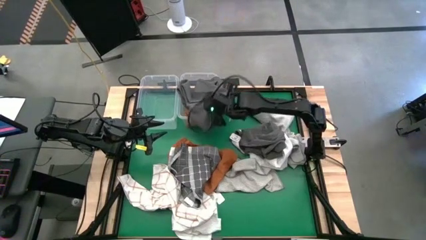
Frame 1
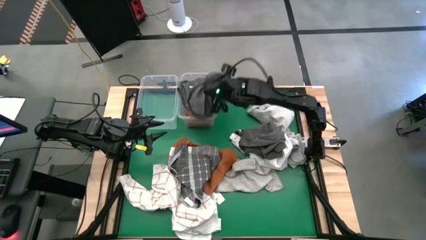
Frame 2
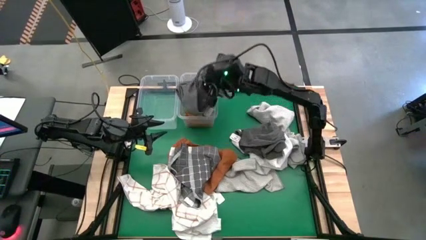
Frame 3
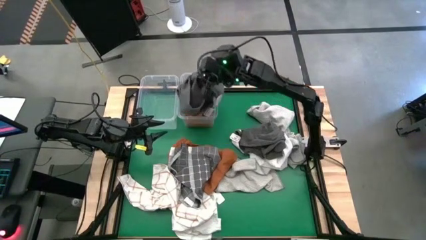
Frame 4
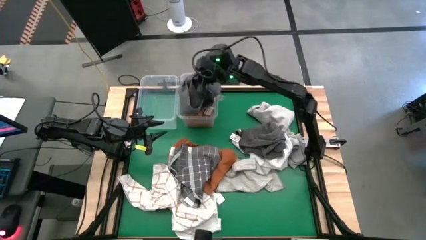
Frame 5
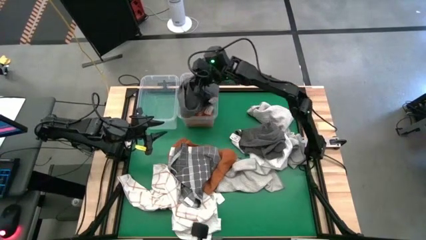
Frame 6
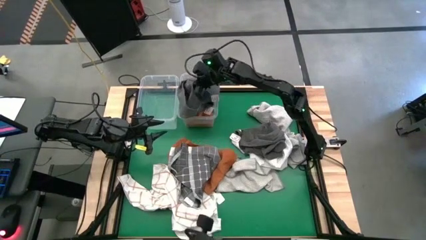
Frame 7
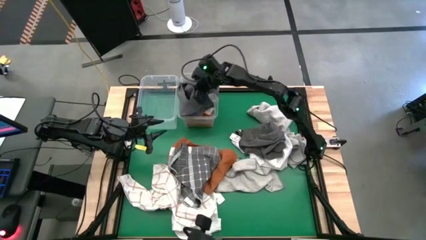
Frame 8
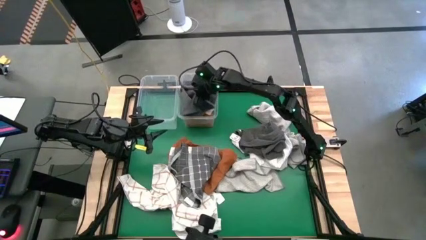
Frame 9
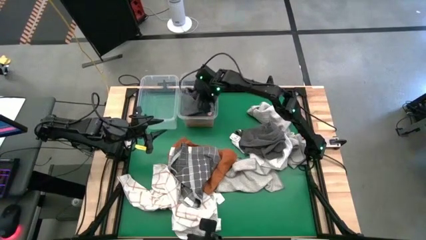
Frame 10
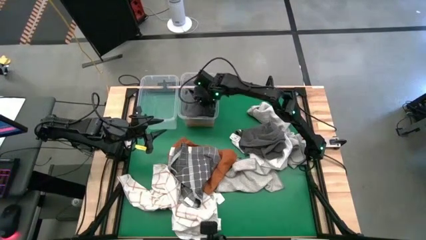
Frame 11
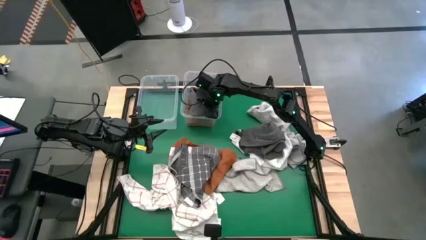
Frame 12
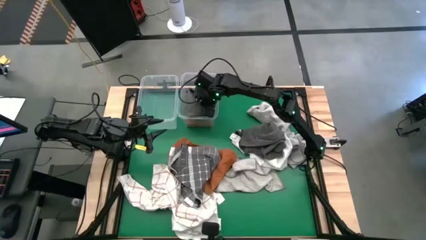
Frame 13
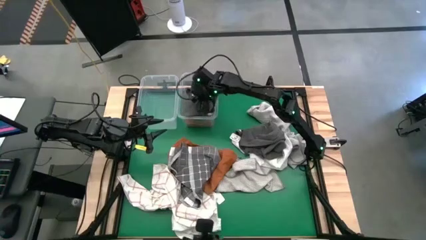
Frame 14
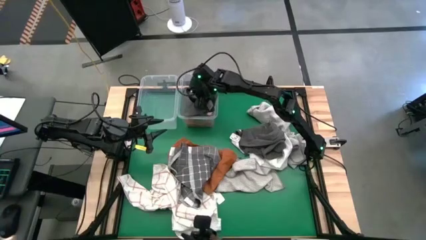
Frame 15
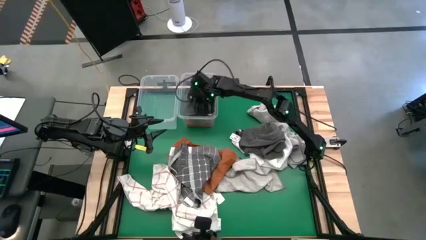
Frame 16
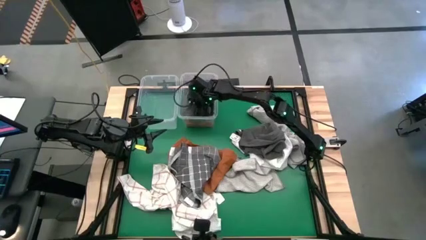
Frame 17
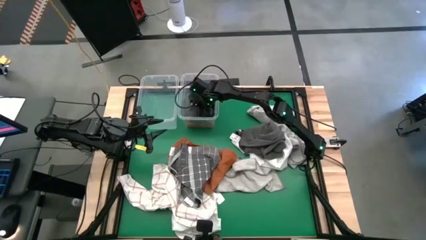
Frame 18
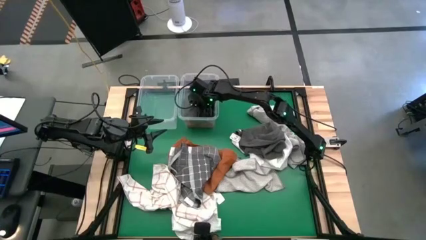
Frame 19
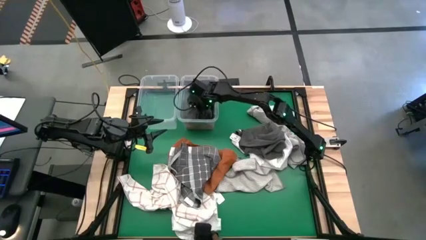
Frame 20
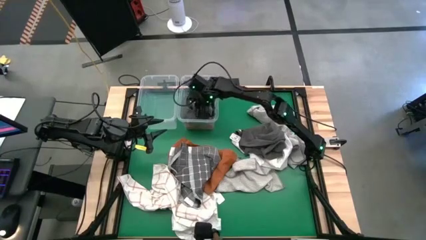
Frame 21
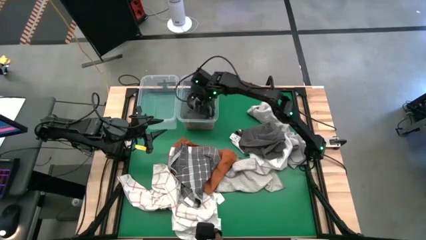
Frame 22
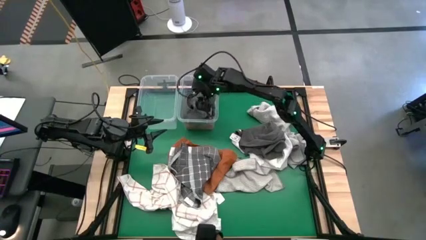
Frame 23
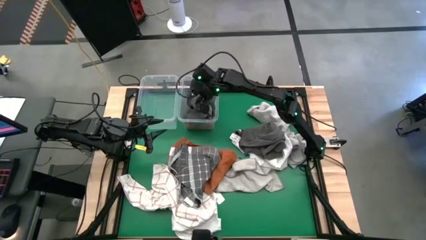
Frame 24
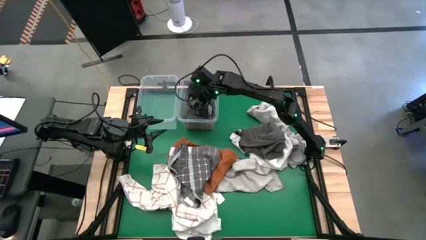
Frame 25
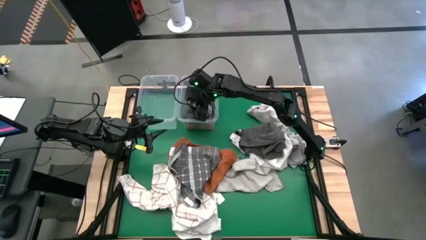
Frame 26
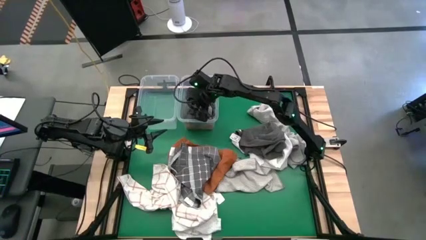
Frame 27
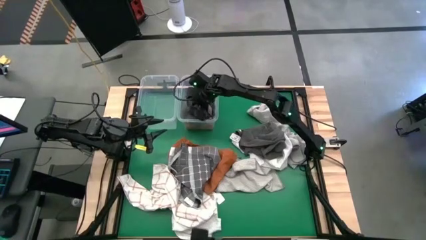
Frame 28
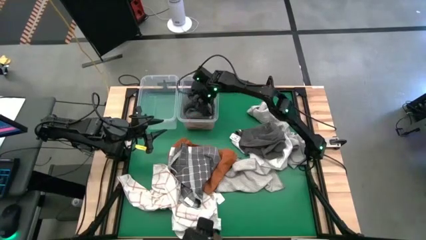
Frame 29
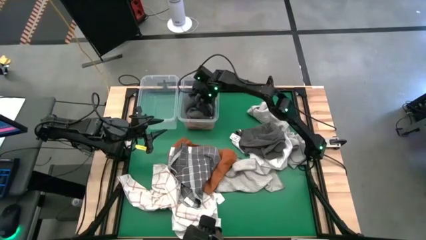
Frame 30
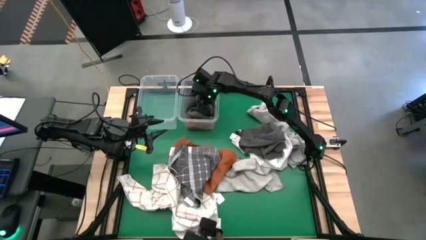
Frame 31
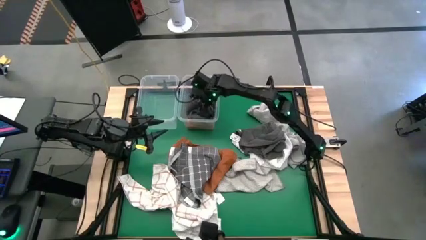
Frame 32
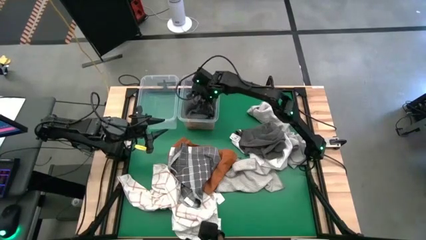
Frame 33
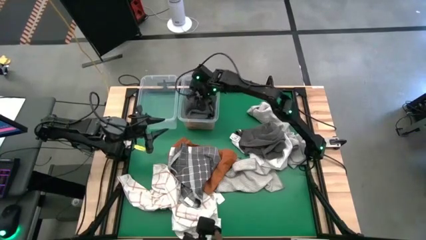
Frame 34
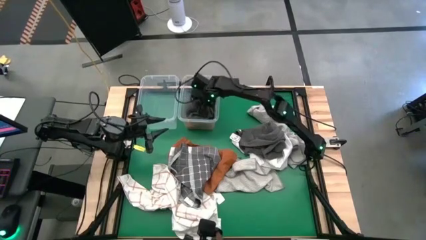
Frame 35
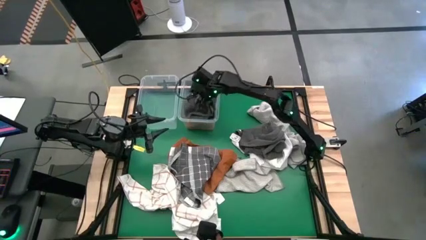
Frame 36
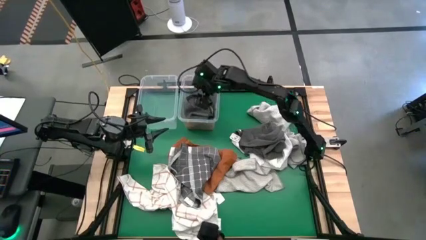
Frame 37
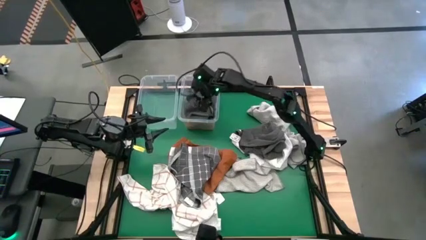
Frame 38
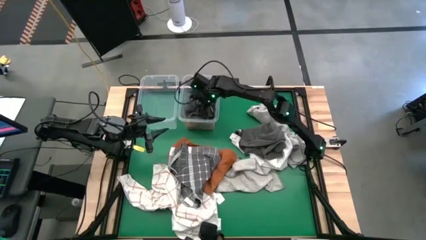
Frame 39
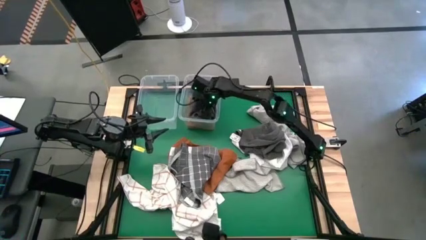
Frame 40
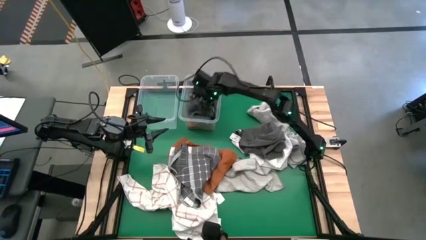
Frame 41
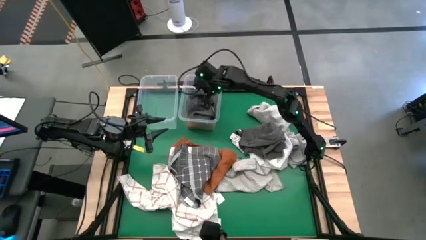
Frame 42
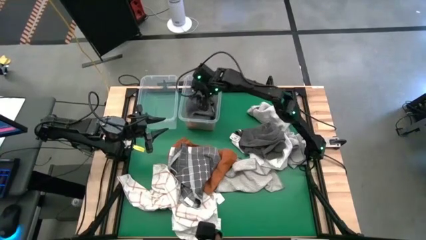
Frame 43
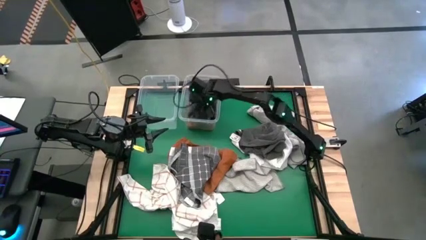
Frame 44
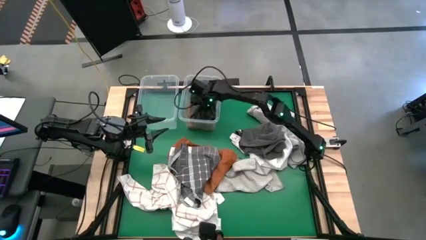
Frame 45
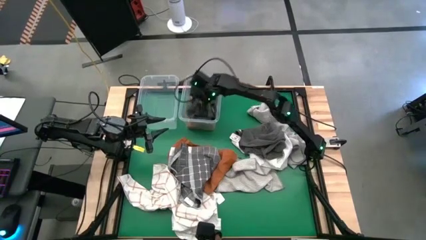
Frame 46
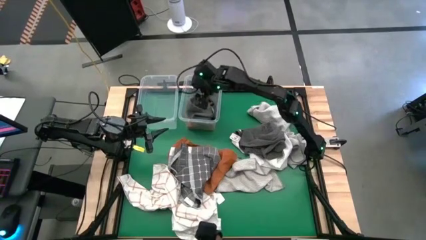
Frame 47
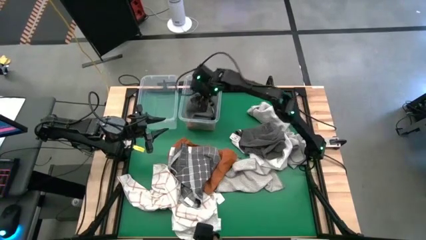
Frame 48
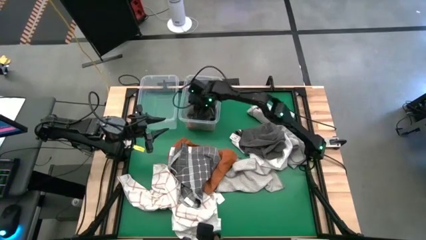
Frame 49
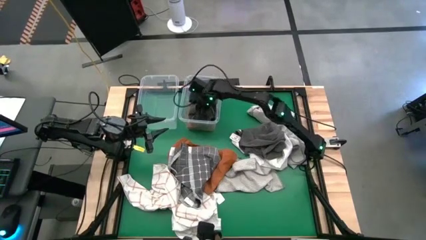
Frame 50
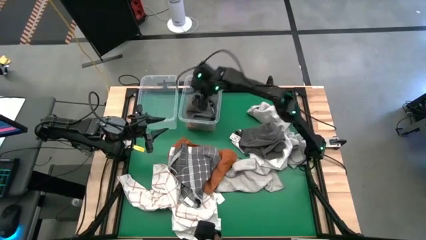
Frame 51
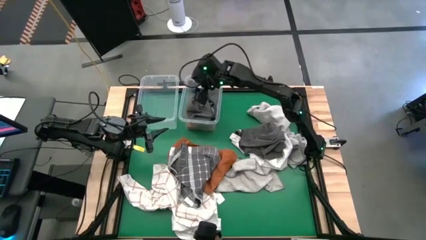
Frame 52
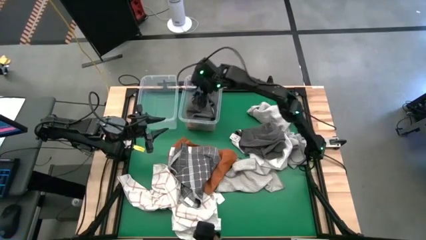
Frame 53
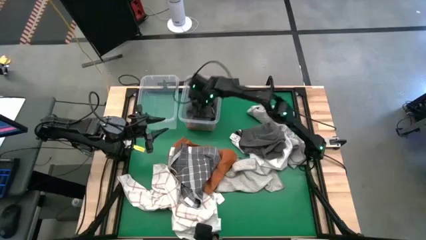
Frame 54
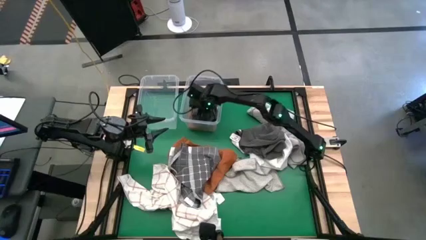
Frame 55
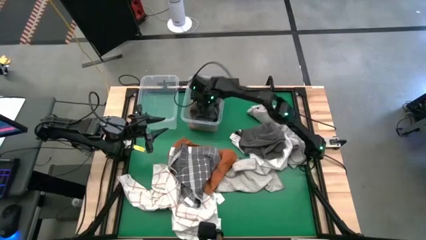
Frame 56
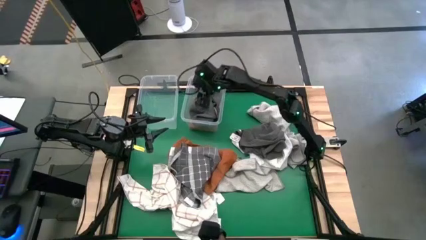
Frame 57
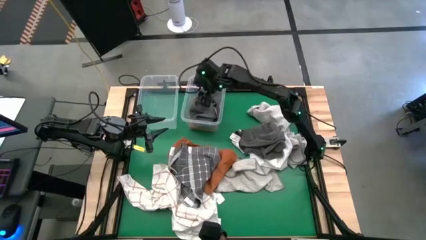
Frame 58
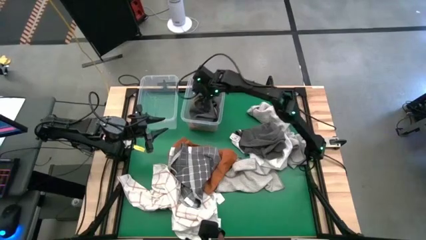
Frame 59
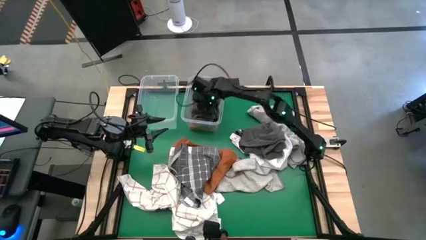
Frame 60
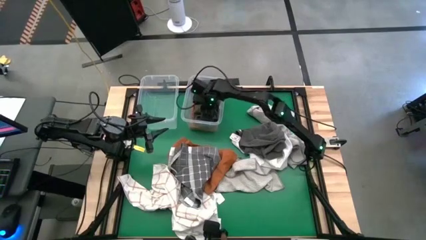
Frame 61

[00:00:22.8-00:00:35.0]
Task: Sort towels by color in basket
Put the dark gray towel into the right transparent bin

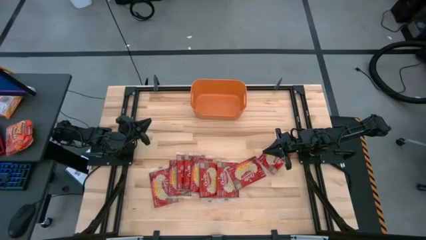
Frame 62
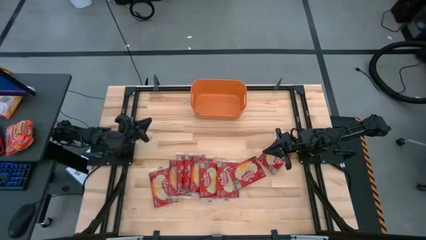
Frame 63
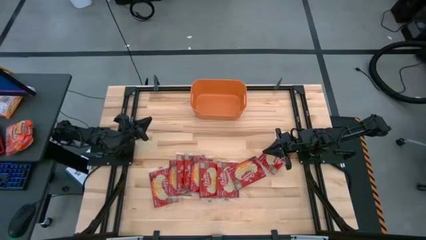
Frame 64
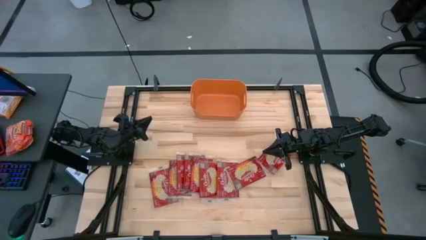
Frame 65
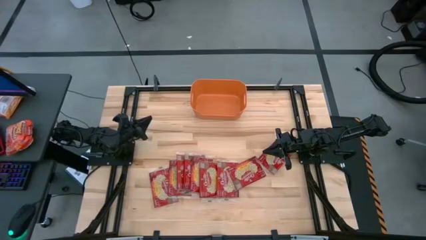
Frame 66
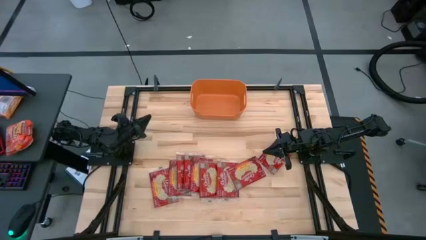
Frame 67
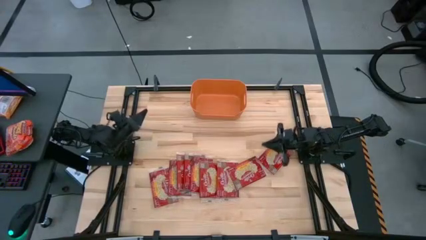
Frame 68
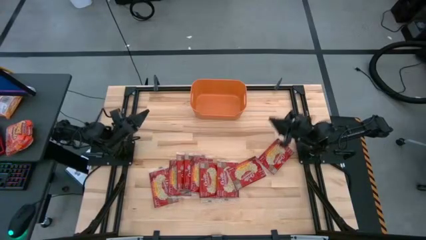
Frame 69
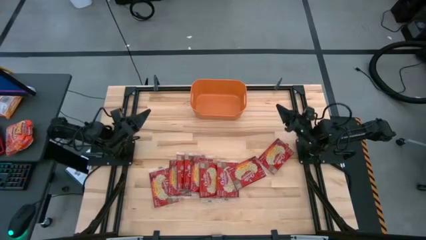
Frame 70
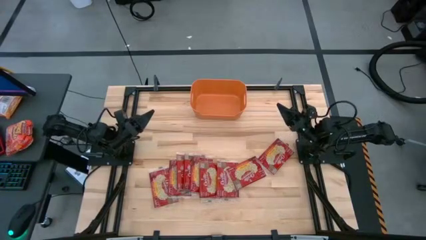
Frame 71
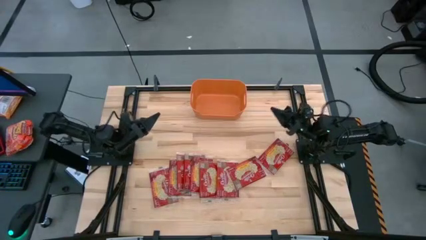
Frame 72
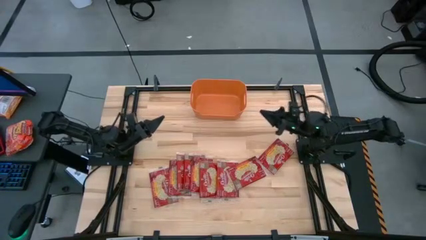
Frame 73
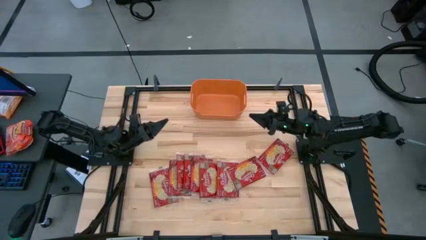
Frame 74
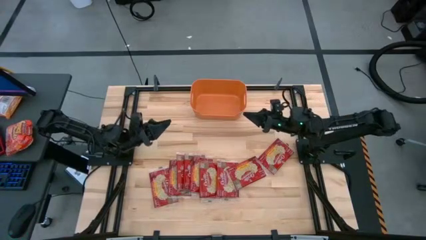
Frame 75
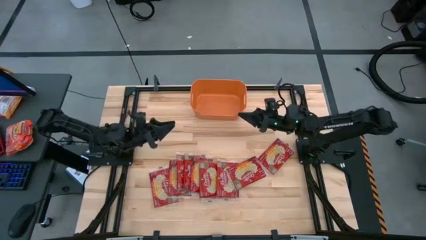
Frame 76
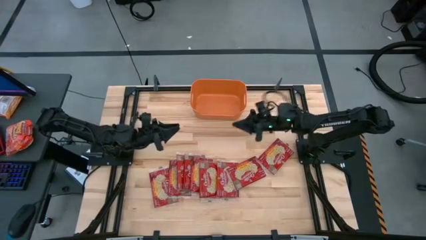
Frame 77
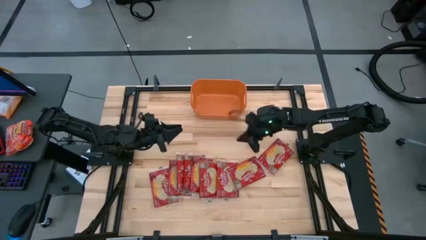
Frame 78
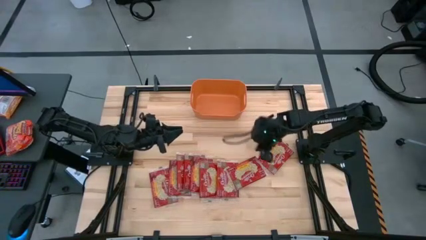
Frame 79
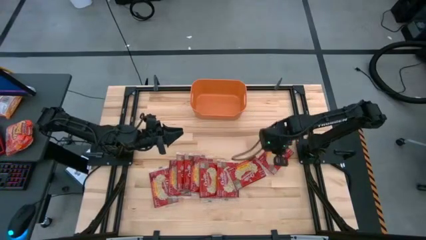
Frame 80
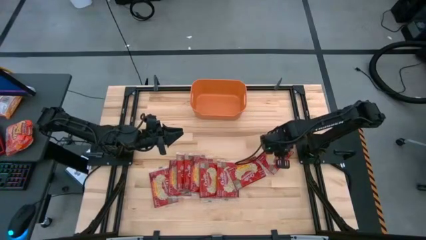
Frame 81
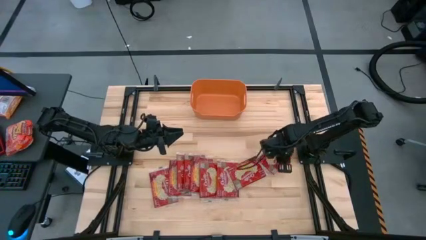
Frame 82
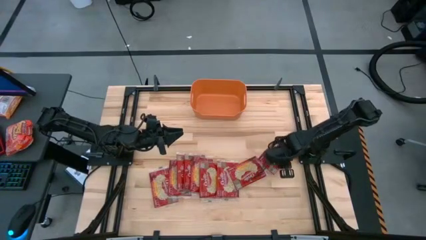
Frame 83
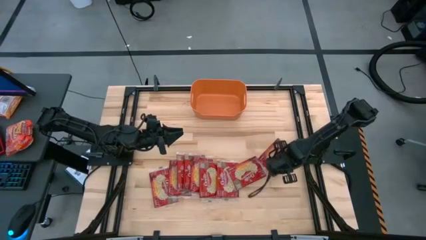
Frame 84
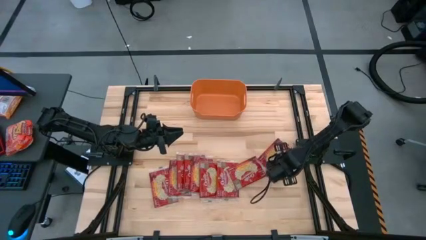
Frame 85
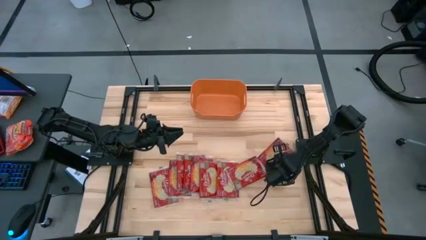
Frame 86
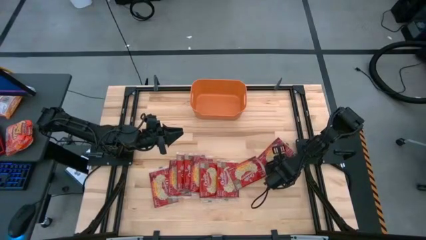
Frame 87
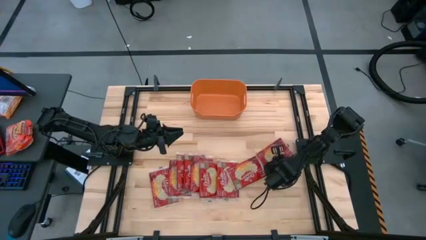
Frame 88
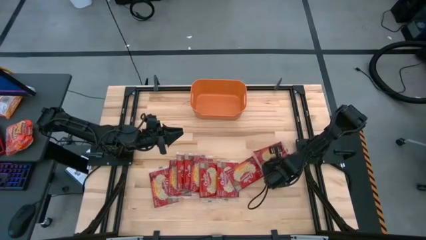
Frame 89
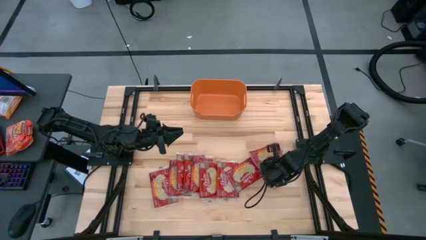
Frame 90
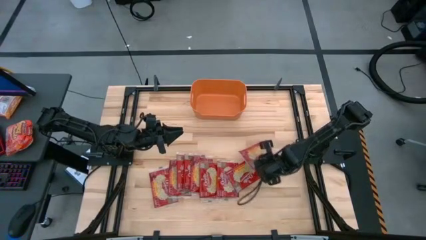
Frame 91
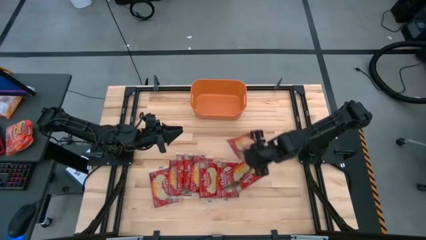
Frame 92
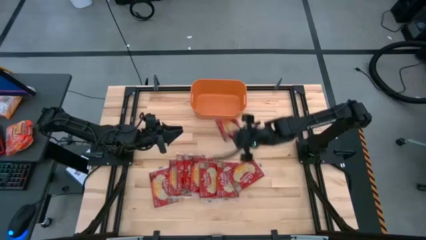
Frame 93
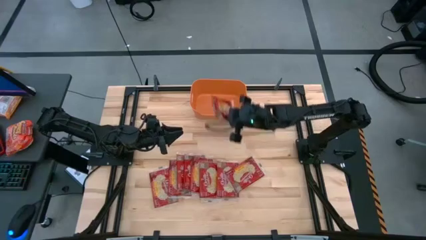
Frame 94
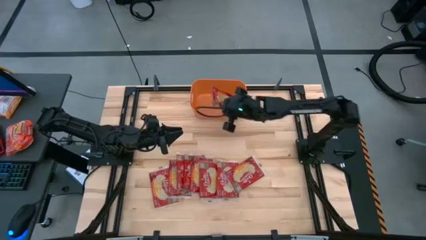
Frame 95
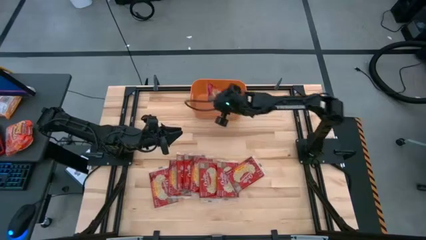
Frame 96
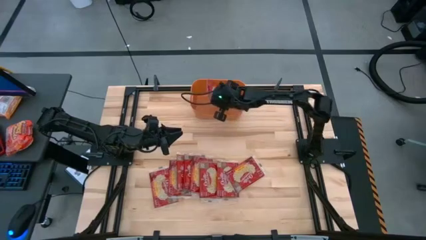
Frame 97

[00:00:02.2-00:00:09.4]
Task: Sort popcorn bags into baskets
Put the red popcorn bag into the orange bin
